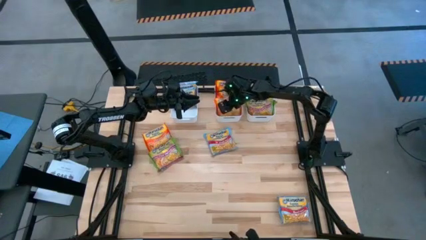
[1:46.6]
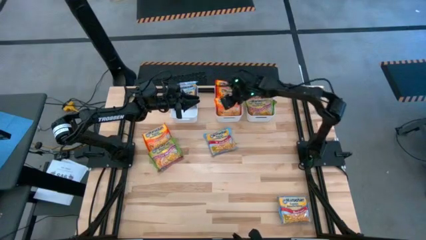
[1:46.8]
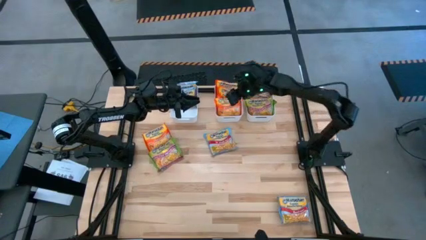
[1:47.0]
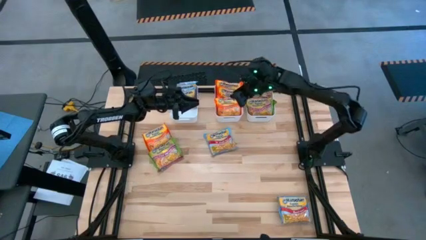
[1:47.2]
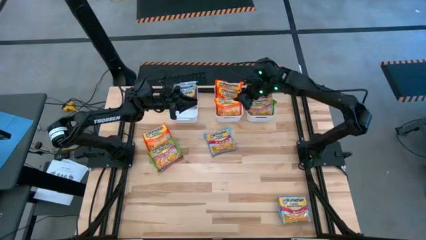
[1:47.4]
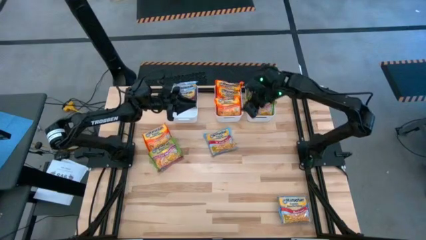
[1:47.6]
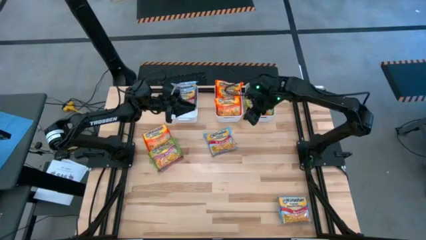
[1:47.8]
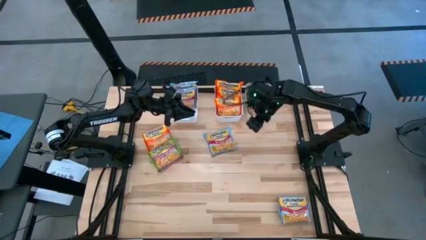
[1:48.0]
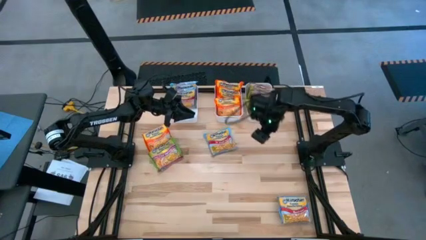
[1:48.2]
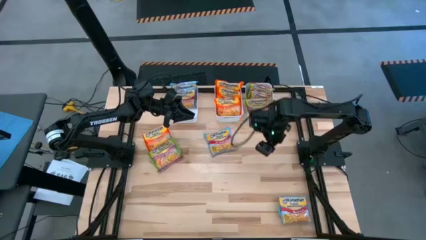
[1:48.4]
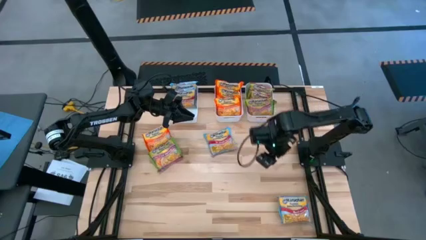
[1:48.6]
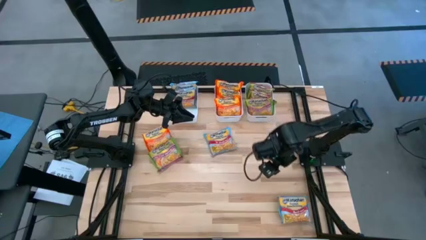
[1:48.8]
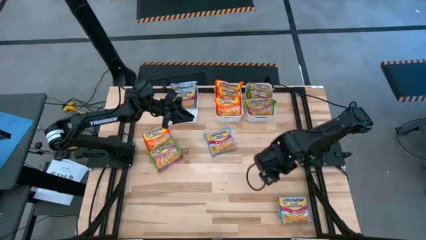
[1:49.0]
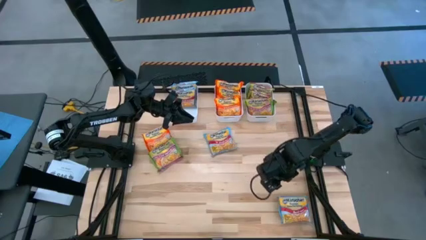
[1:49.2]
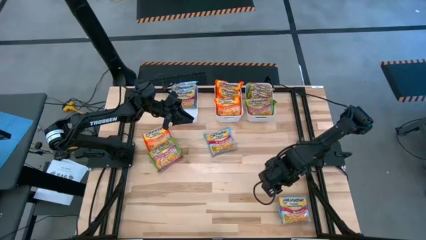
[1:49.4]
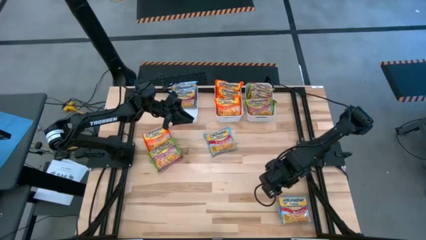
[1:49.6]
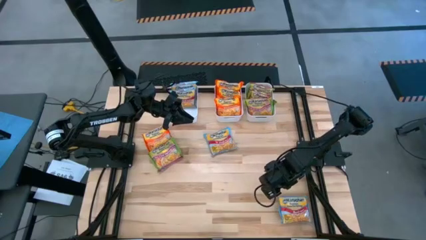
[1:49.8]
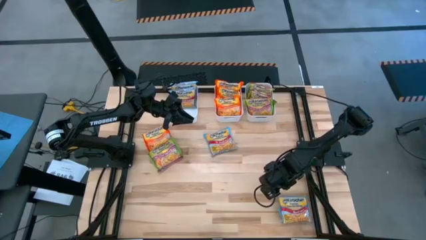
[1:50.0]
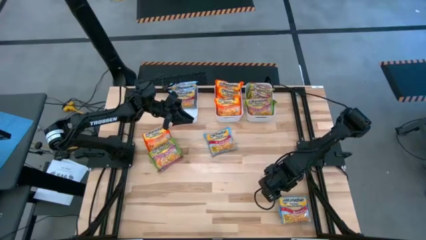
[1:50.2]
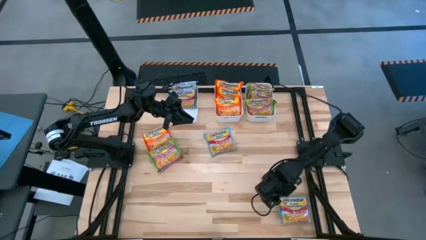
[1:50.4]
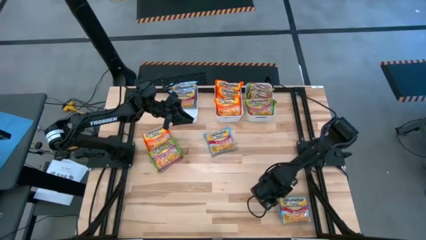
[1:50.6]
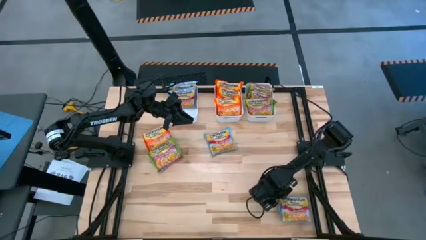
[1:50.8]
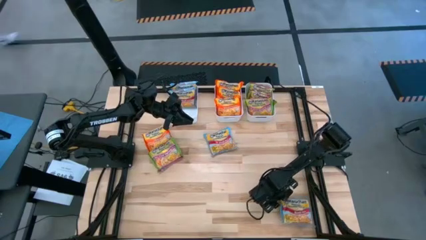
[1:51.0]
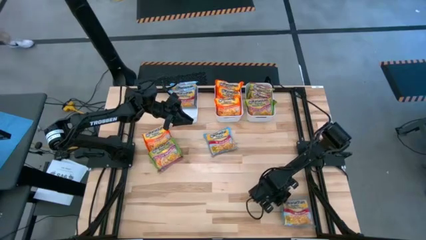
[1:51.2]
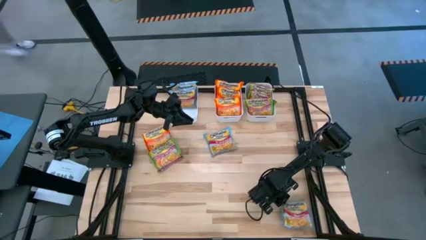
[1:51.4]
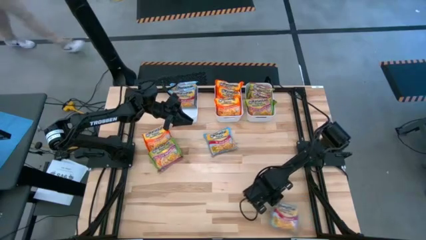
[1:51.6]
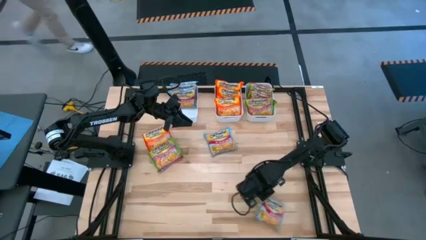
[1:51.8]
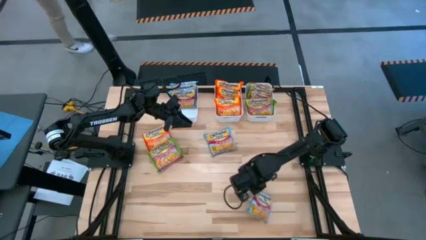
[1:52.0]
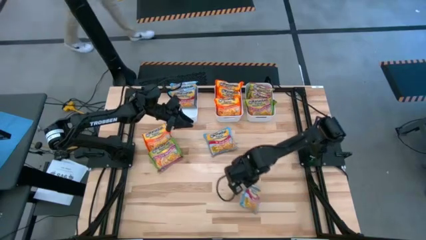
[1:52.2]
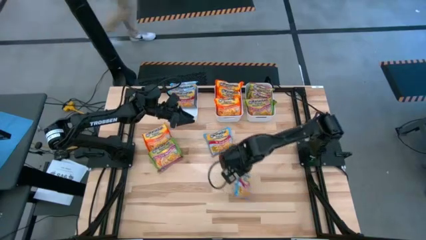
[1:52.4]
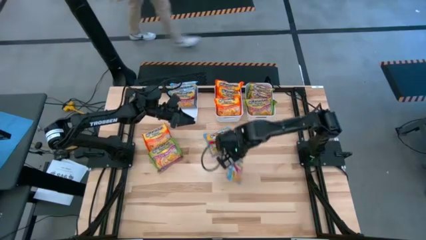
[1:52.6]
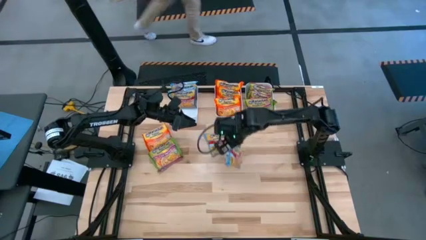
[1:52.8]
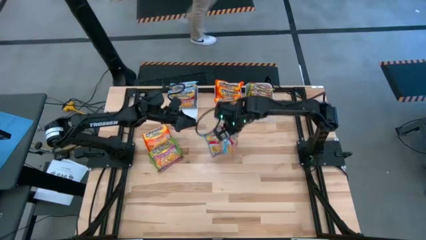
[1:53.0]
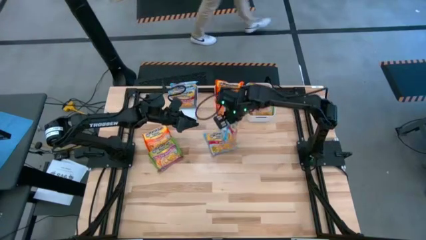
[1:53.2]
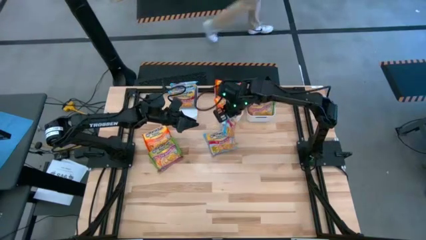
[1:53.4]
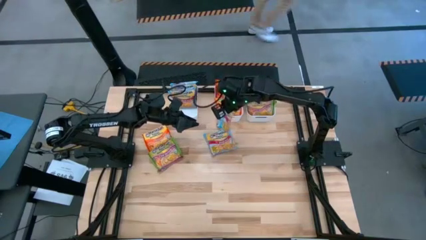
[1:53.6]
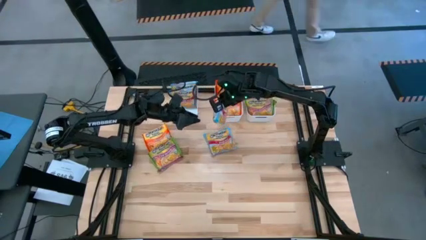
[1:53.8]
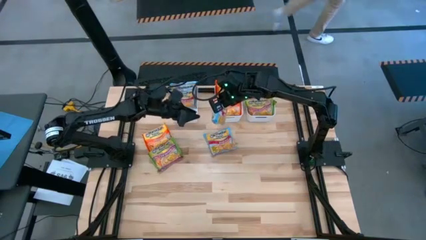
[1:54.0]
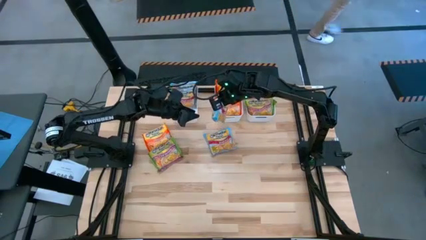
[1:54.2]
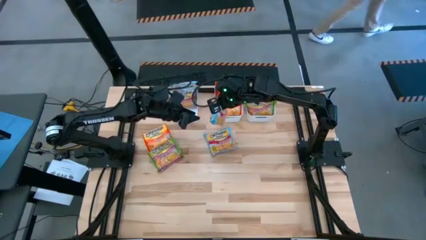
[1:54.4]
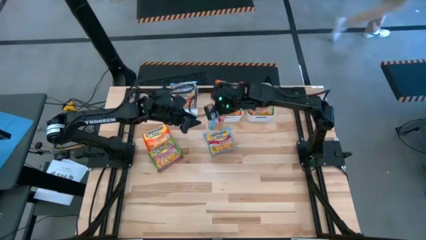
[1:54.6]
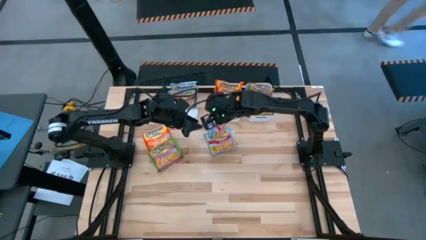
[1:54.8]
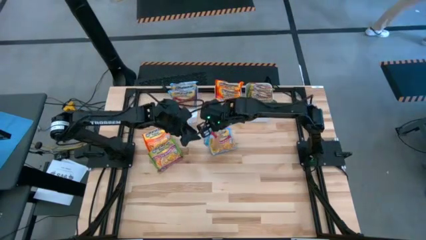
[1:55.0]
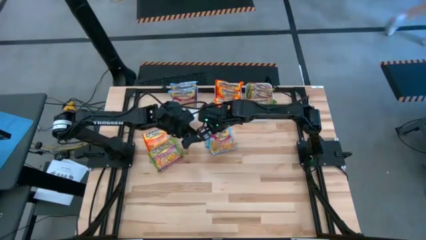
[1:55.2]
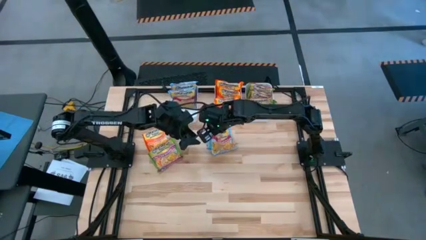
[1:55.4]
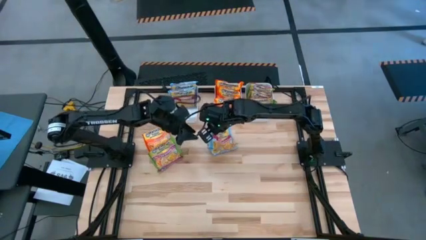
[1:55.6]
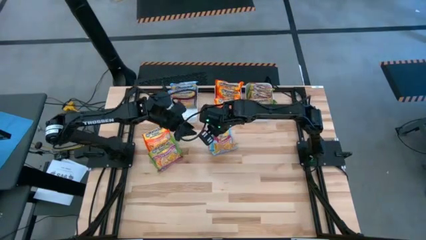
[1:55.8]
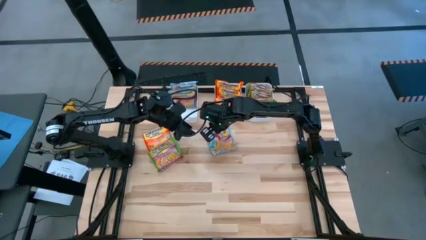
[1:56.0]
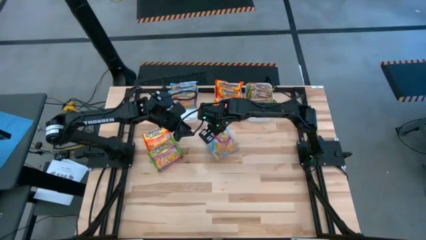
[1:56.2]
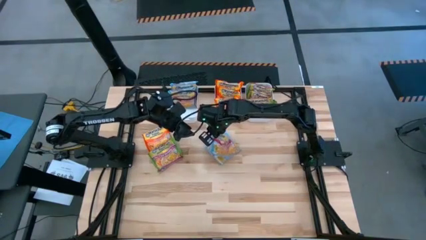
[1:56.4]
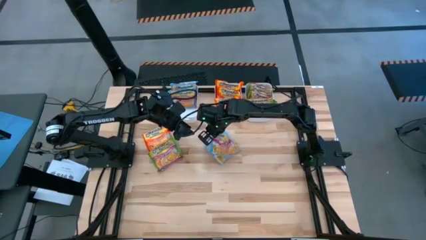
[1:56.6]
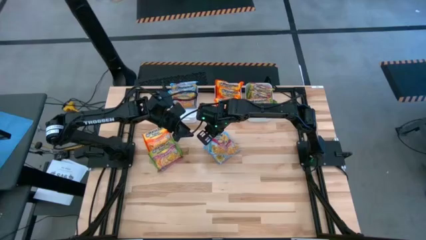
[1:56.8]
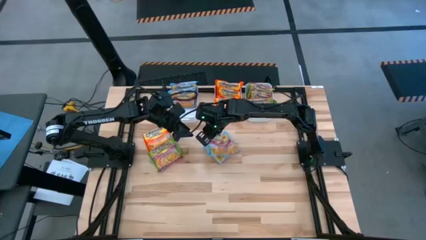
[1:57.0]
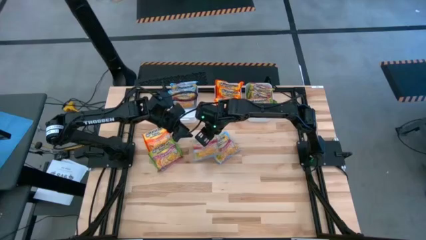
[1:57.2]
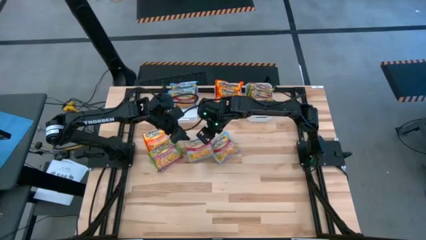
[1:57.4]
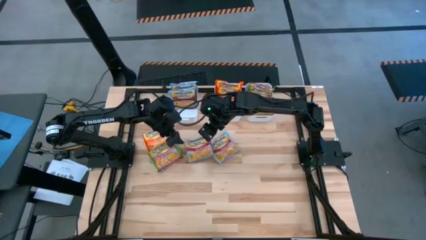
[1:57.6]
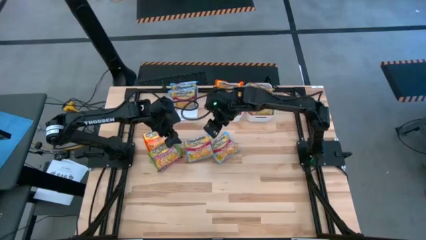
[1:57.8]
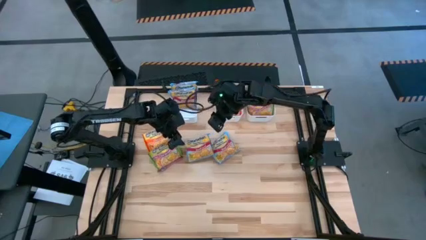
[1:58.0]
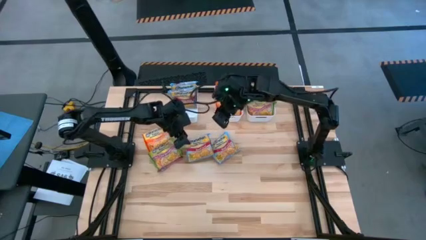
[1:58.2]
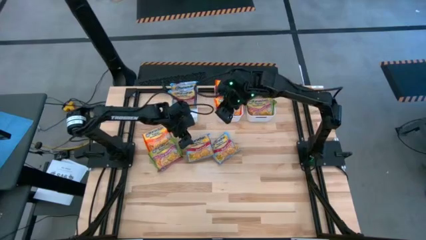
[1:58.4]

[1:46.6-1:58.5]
Task: Sort Maruchan noodles
Put the blue noodle pack into the left white bin
